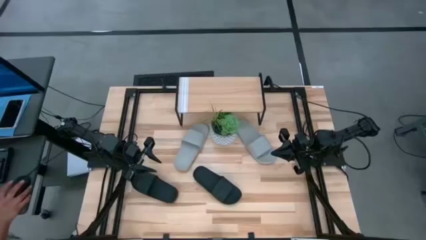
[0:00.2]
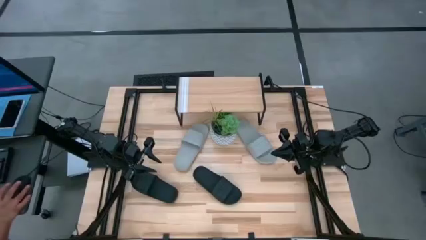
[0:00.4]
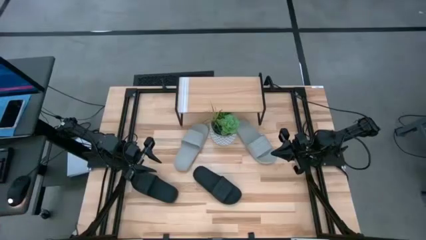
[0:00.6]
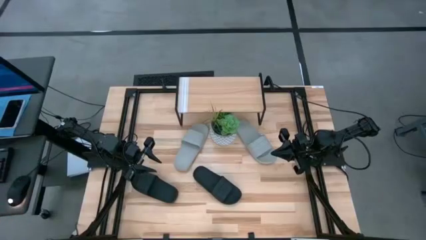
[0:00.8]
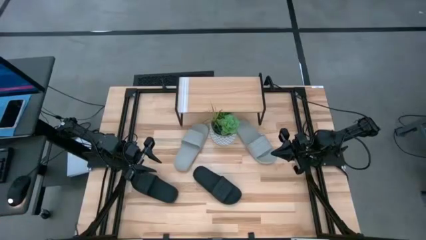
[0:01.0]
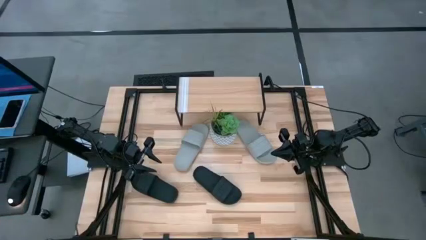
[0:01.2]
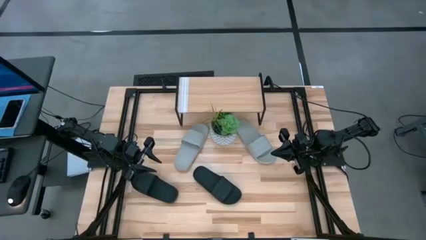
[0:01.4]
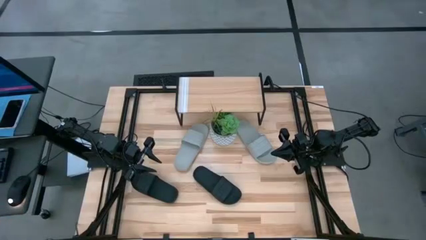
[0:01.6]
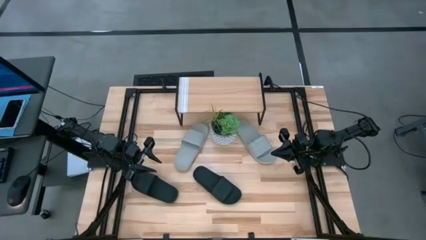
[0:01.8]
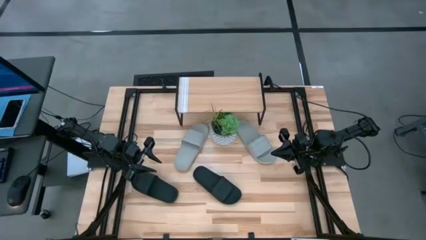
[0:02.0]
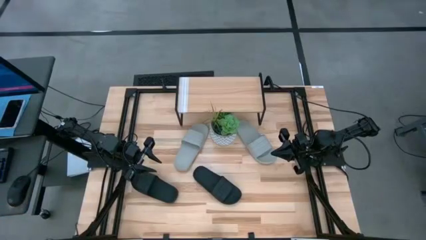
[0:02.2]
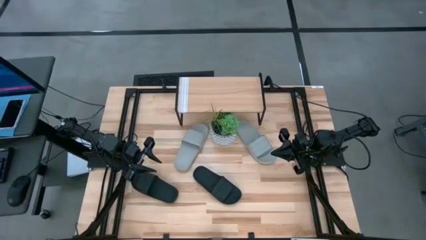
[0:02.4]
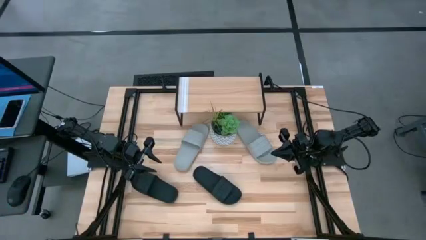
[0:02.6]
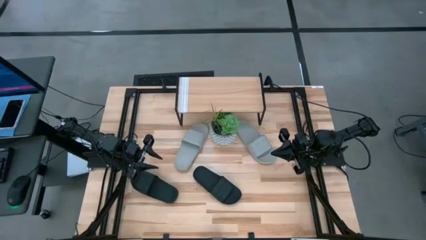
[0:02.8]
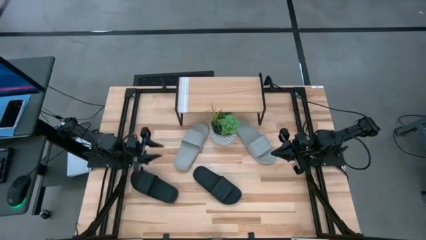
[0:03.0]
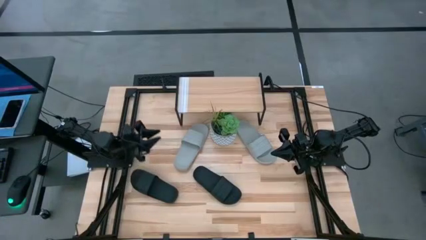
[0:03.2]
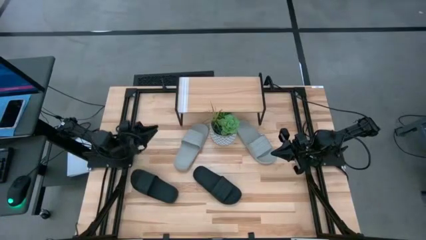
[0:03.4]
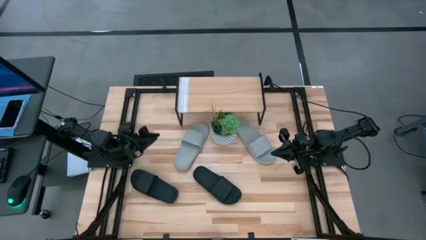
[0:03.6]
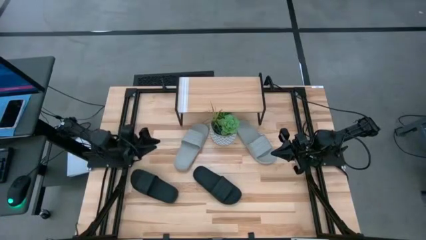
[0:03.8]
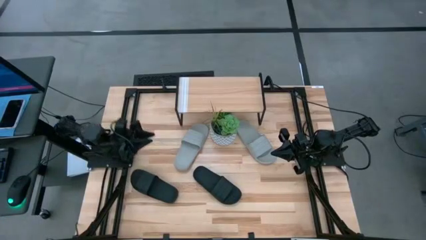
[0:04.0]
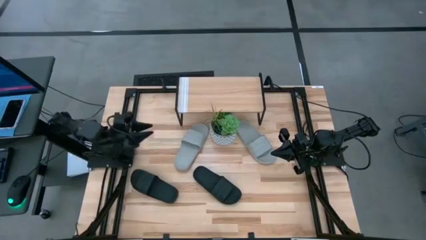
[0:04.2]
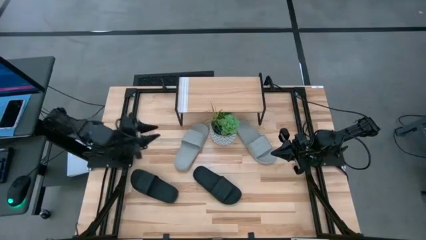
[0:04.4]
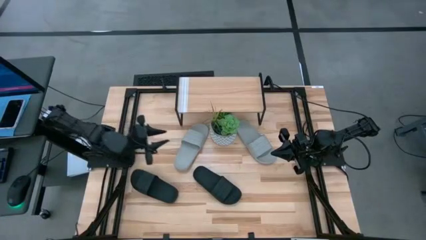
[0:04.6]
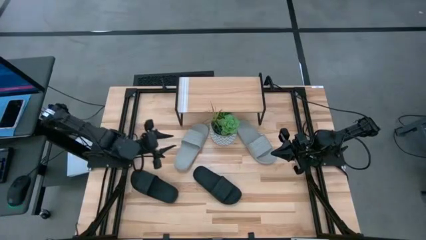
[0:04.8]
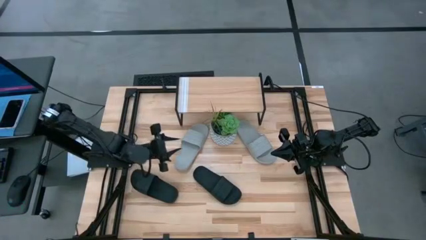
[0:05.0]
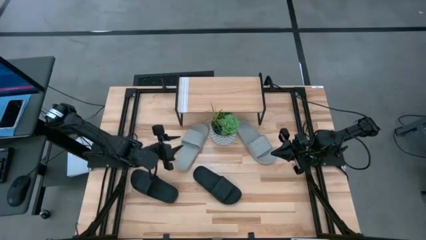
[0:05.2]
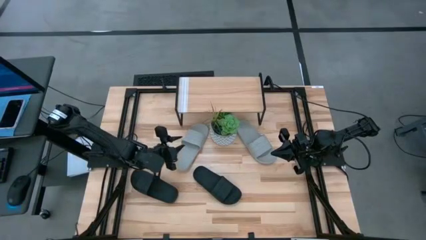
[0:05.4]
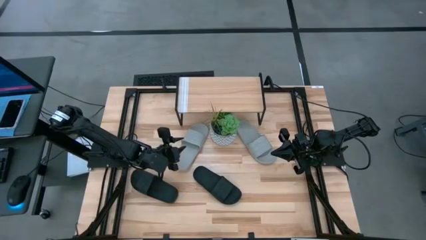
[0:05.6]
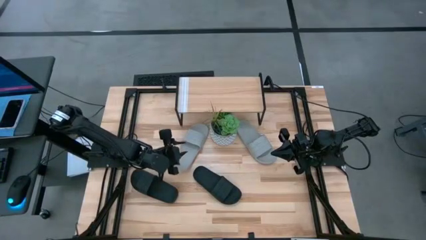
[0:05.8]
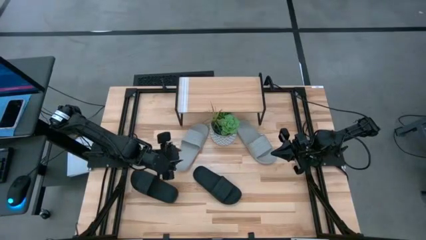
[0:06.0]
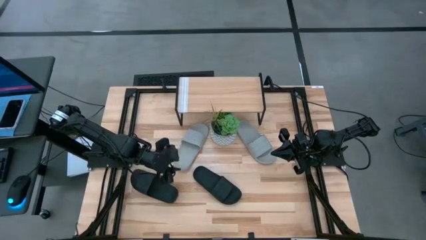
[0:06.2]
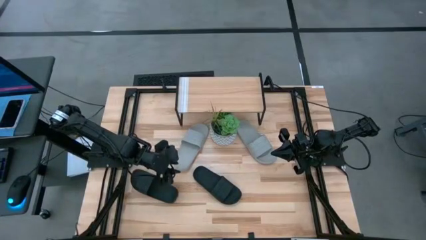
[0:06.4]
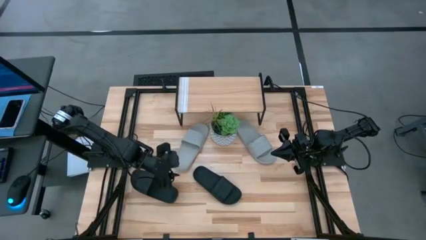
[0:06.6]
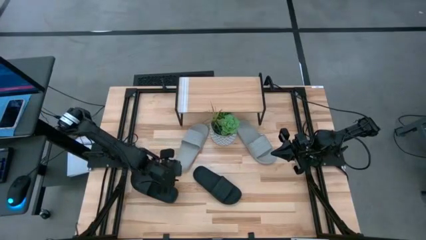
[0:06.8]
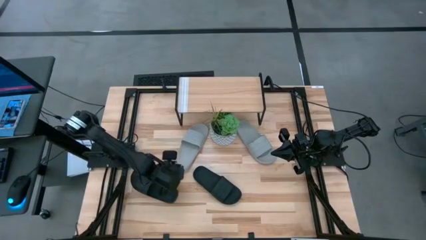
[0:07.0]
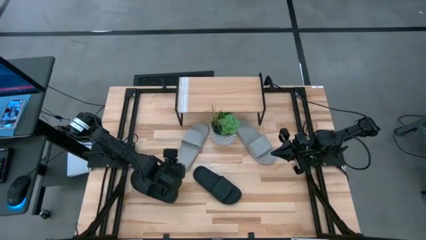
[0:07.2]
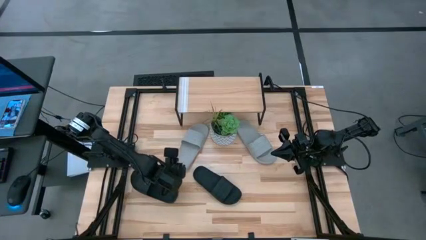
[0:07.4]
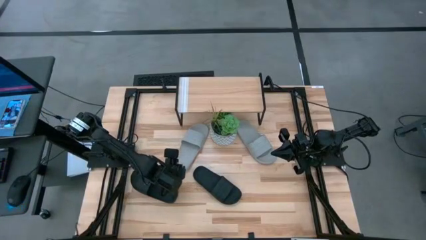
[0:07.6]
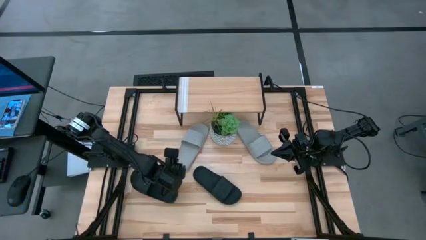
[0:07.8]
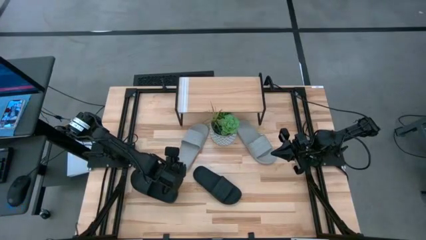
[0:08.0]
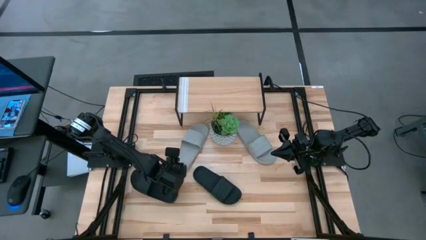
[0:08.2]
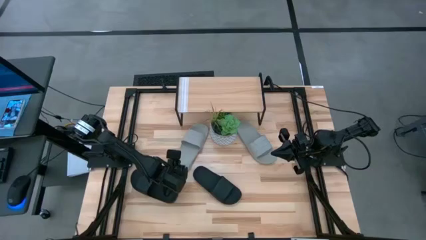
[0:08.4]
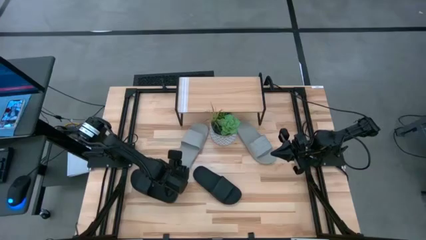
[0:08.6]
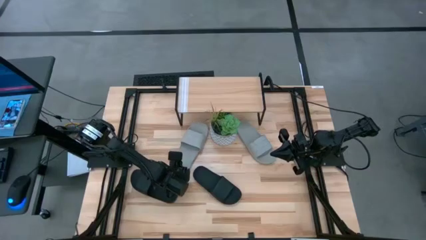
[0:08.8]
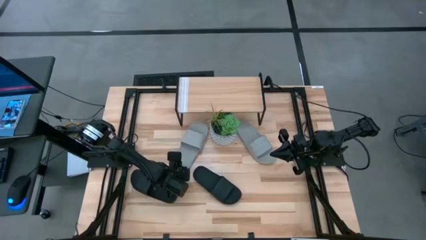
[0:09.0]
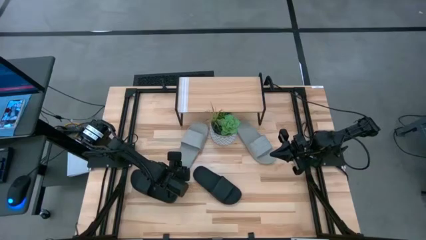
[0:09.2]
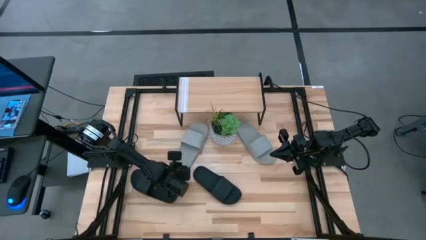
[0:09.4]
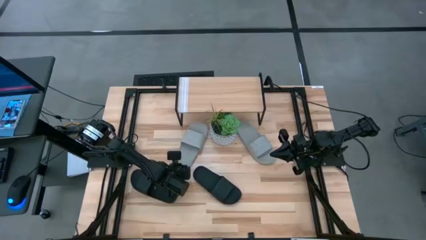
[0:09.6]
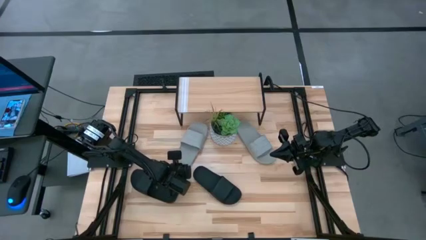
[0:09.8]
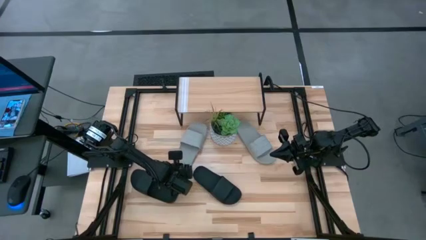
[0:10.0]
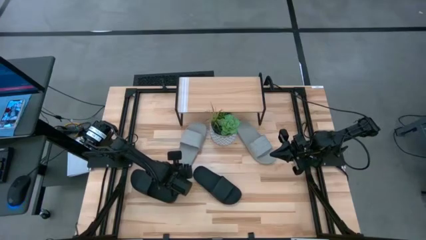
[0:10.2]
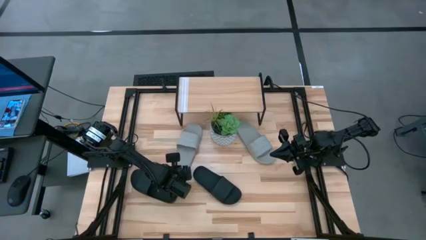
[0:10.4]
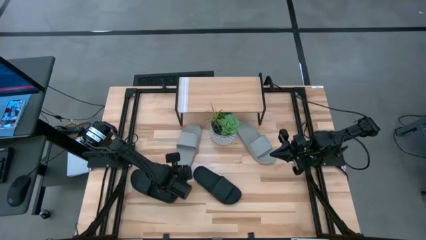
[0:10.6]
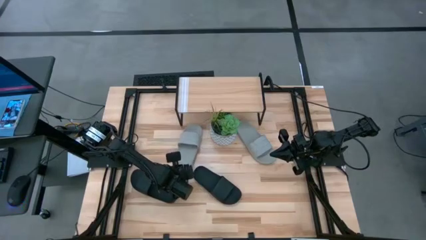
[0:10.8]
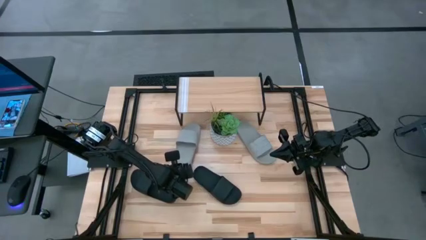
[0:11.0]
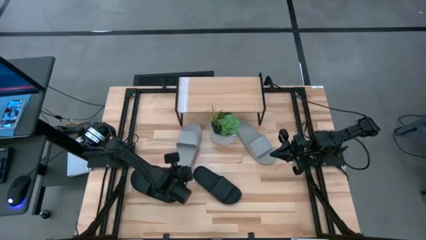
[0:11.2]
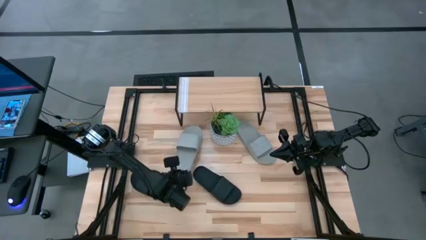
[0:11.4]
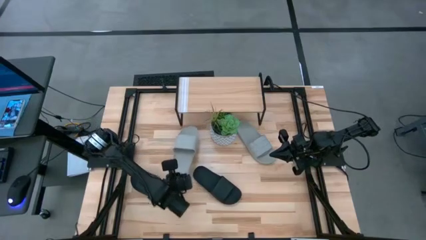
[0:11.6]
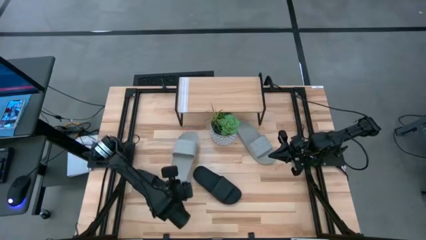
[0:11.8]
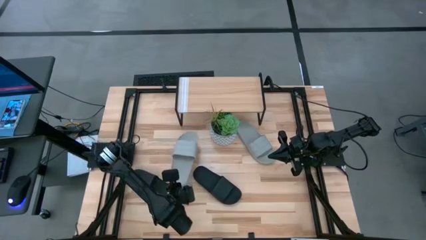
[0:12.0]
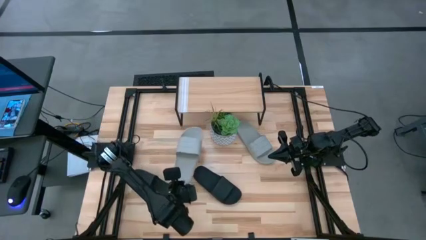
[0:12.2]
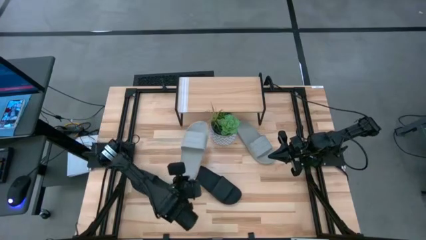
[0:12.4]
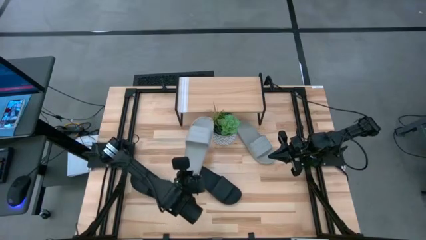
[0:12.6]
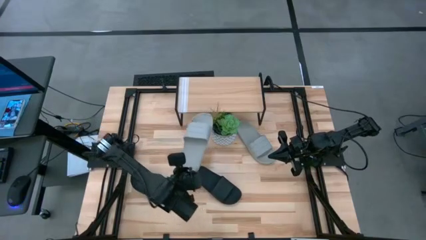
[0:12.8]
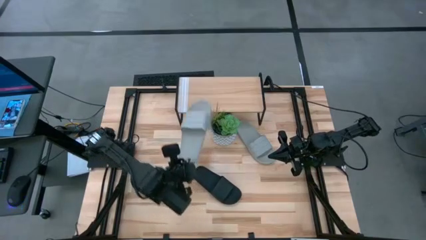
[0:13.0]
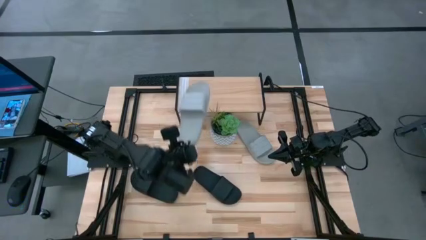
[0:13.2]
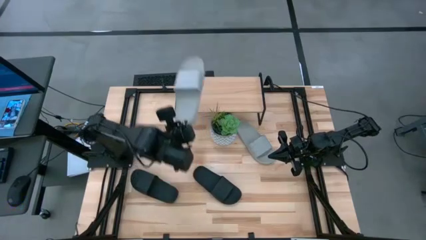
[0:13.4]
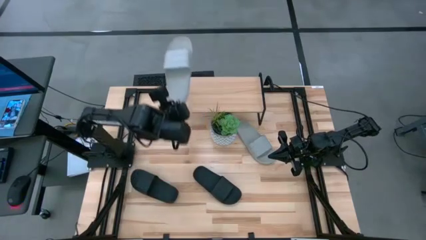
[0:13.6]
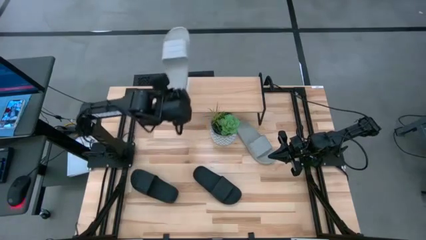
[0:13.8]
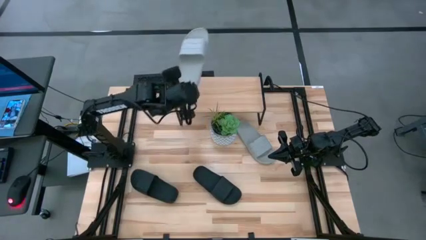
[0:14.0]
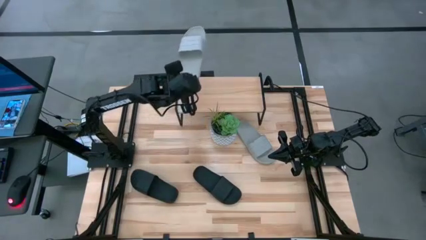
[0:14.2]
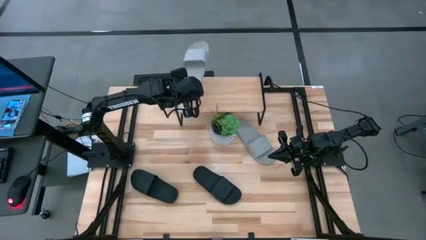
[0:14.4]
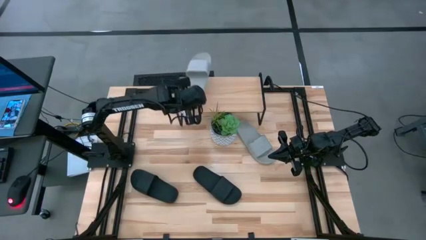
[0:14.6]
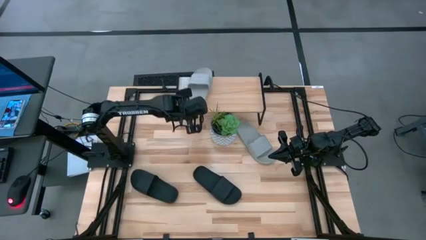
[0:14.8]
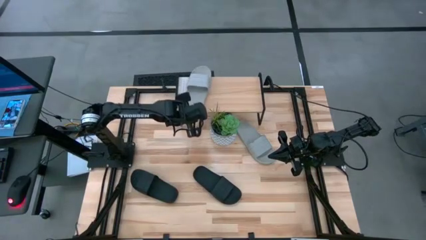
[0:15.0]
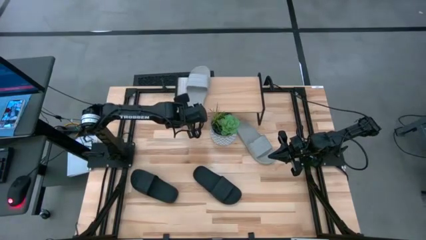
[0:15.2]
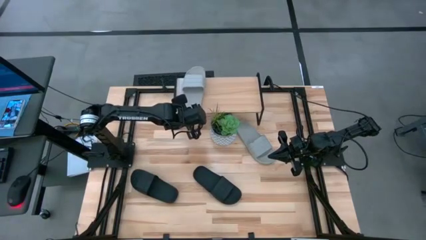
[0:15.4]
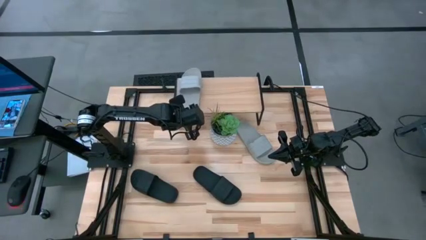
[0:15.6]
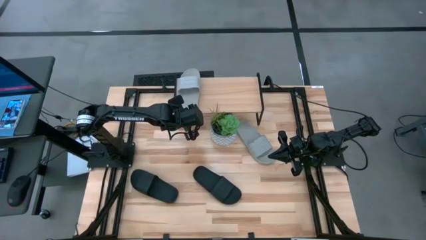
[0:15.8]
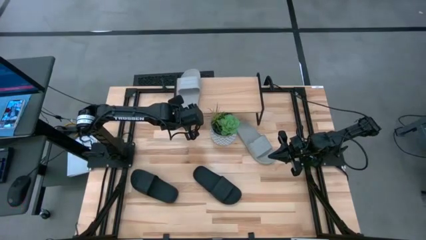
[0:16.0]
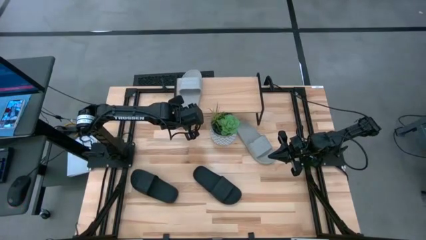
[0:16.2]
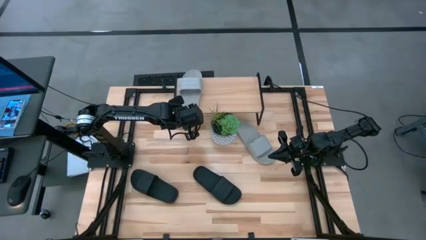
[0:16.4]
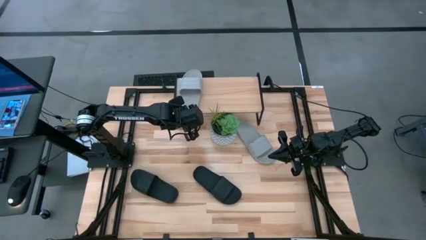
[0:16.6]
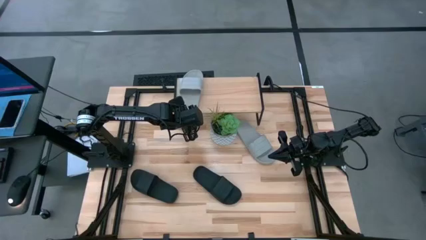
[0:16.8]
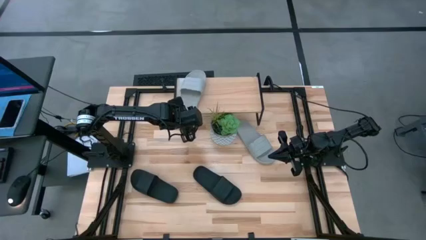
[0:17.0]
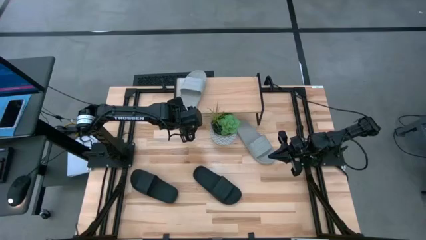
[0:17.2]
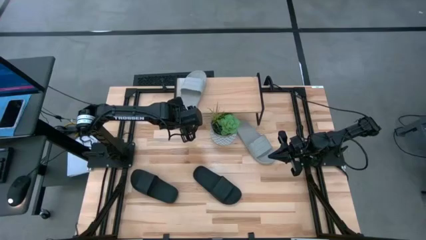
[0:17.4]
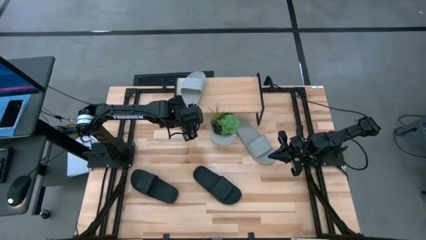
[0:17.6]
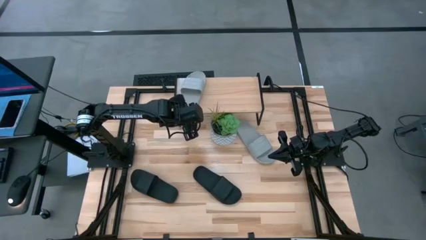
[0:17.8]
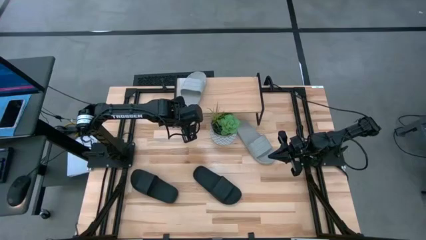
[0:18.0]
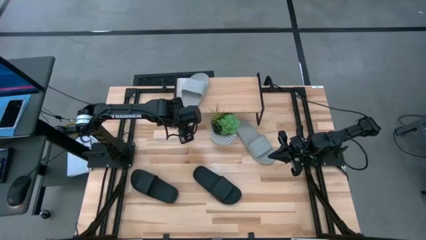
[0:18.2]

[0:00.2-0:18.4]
Task: Pick and place slides into the shelf
Put the left gray slide on the shelf
